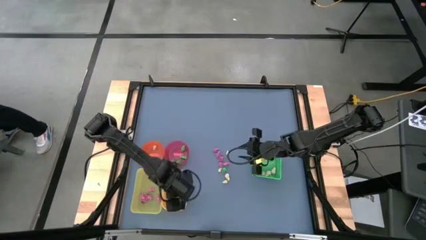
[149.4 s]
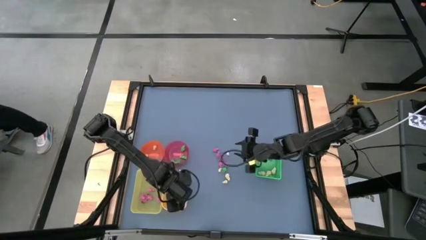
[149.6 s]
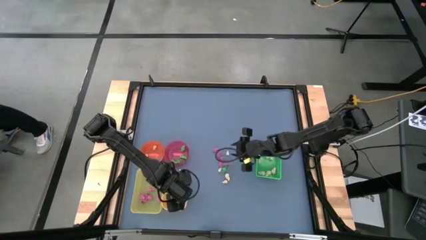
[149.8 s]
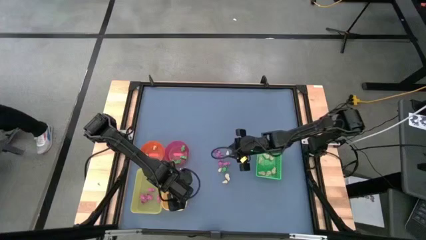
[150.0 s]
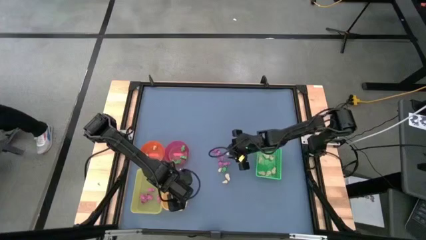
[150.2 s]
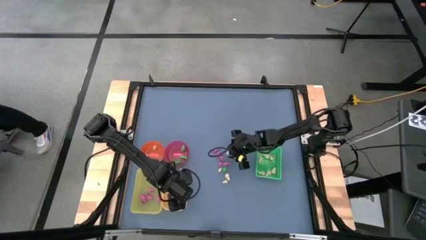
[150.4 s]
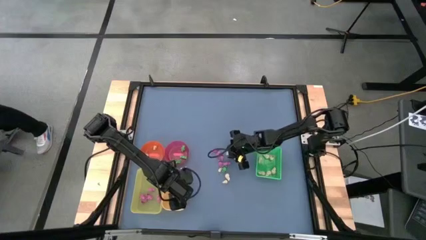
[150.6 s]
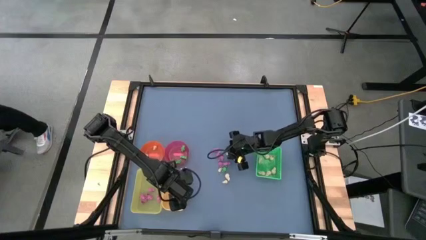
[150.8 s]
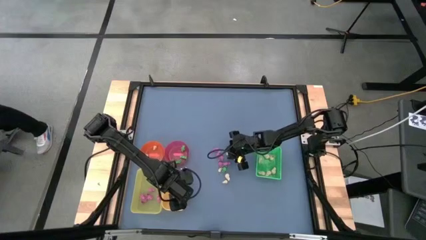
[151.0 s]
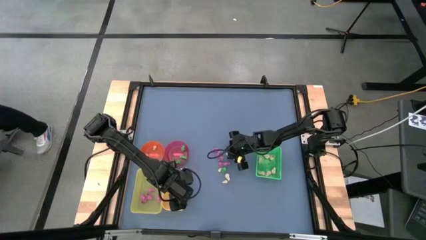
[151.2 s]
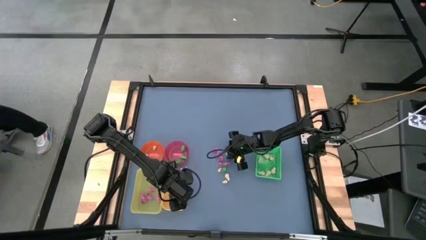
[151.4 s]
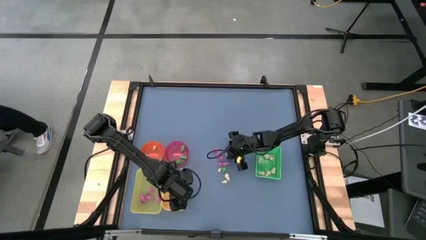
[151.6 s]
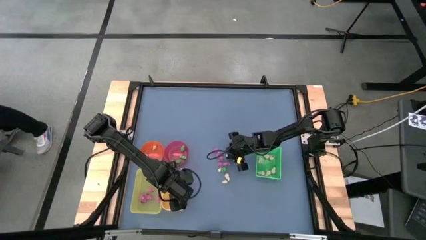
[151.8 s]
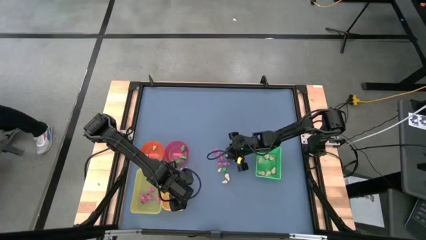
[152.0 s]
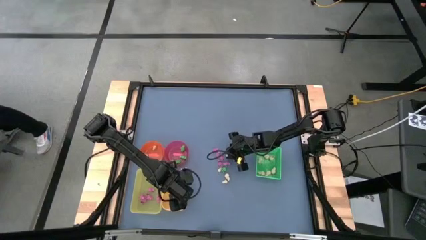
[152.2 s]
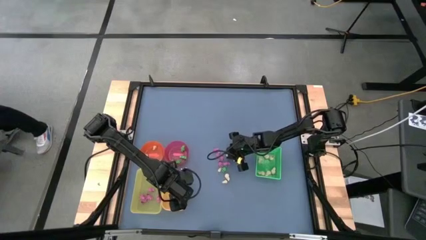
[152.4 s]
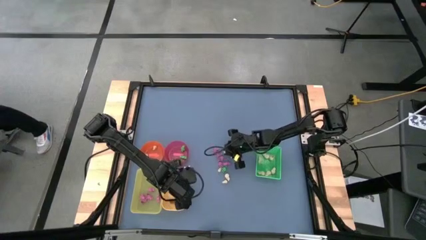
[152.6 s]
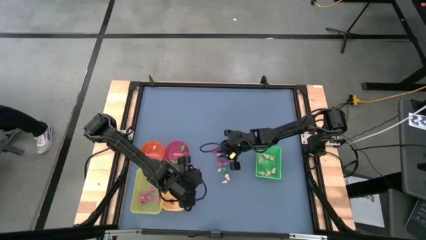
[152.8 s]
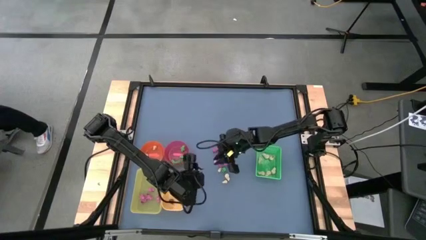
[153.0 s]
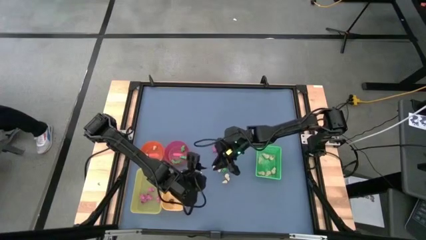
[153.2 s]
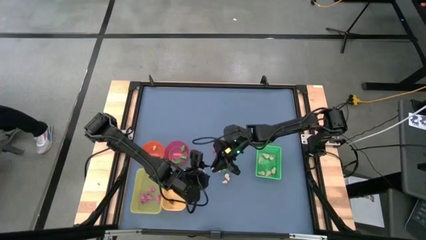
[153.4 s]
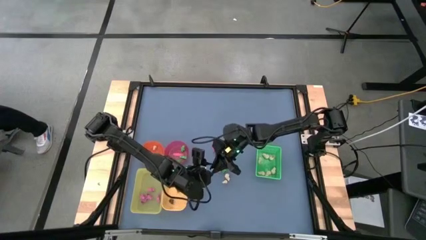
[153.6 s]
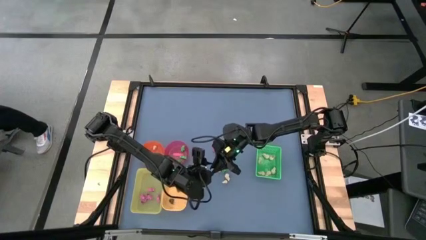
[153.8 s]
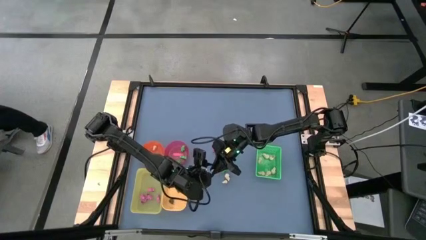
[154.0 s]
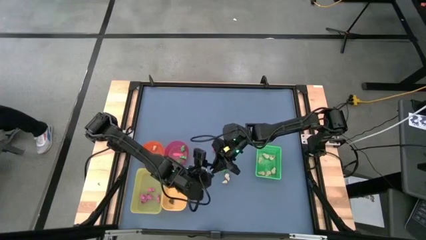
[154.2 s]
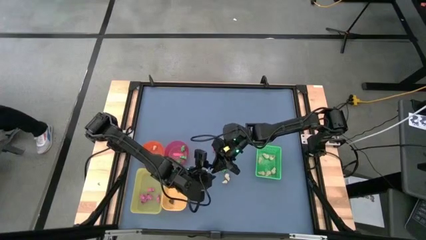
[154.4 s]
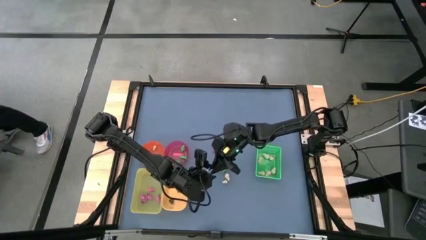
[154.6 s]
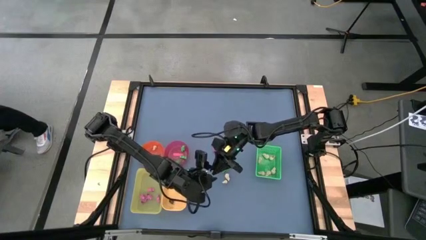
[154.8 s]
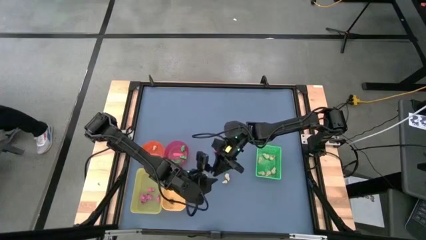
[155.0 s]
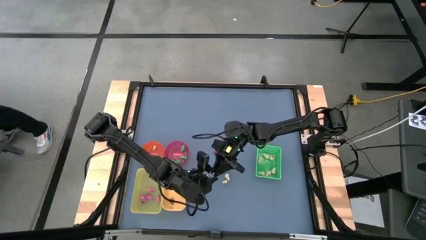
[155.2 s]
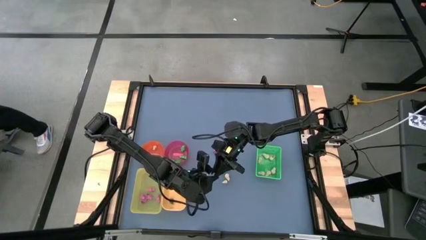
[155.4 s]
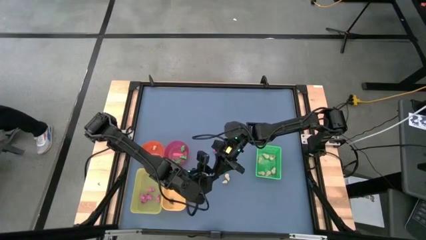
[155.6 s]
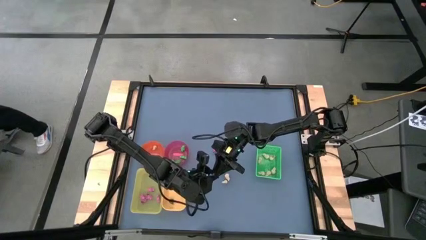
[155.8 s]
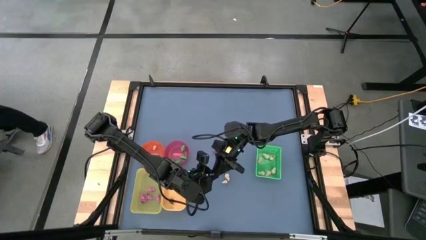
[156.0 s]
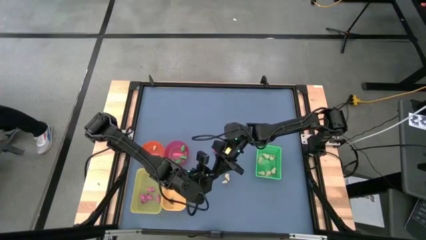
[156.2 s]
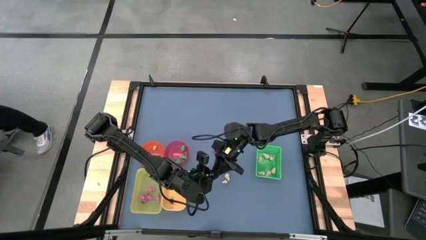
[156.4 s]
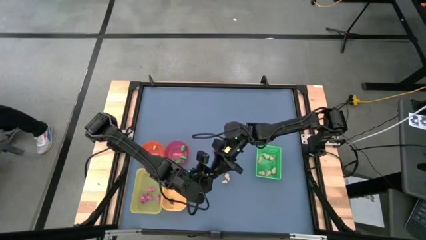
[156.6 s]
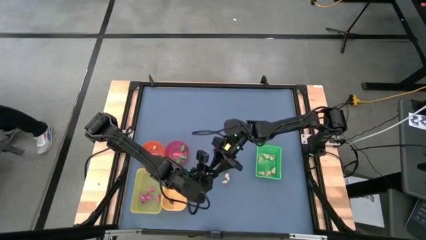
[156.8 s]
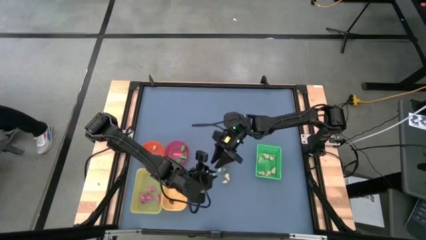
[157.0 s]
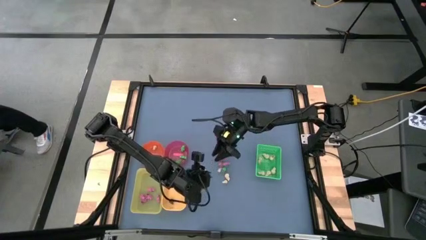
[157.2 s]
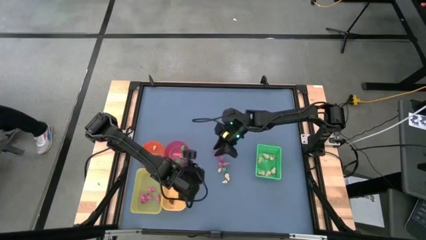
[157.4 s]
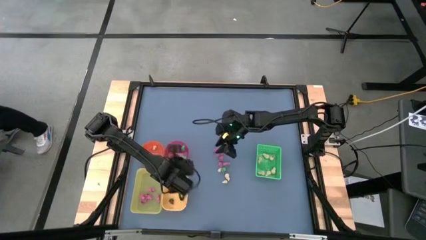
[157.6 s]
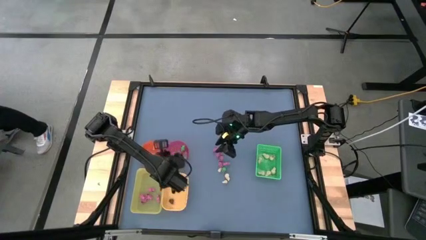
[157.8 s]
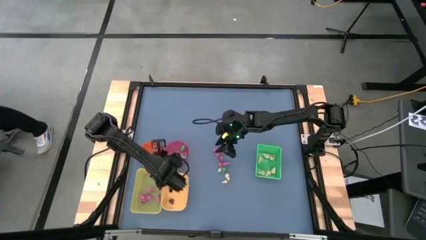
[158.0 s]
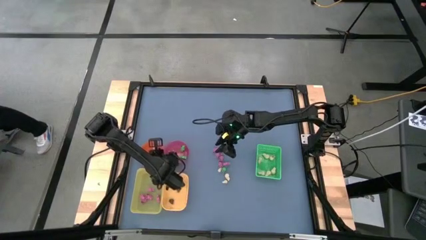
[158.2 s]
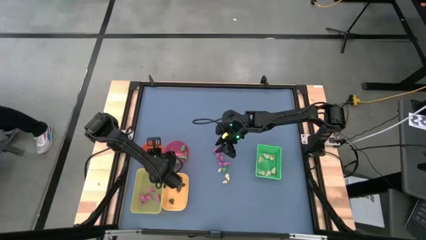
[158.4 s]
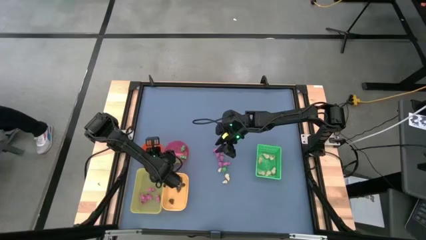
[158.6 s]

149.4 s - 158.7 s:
Task: Sort Halloween decoration
Put the white skull toy into the orange bowl

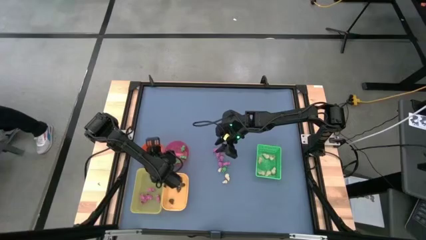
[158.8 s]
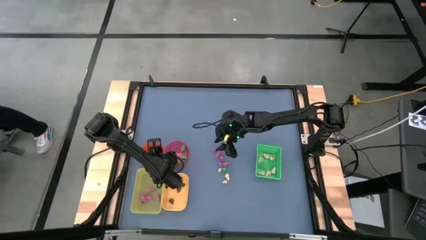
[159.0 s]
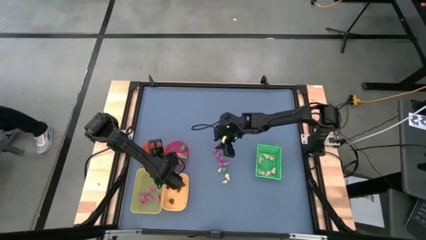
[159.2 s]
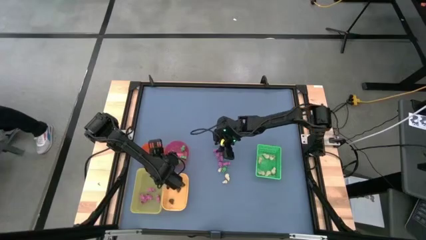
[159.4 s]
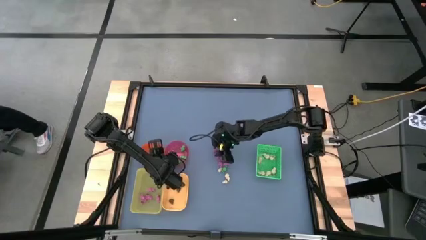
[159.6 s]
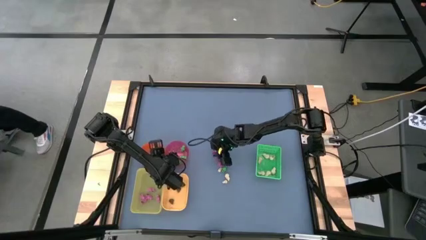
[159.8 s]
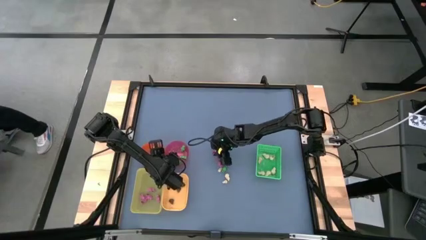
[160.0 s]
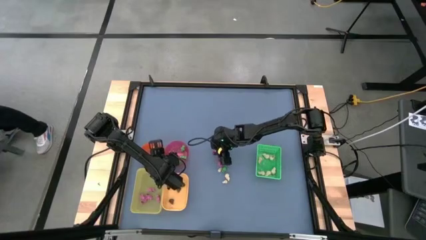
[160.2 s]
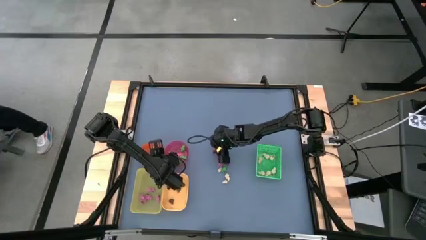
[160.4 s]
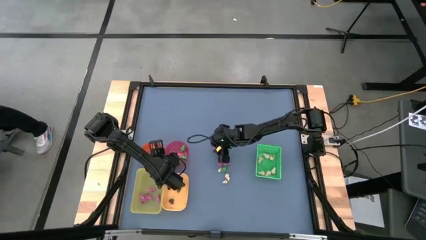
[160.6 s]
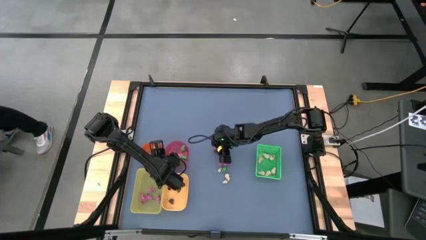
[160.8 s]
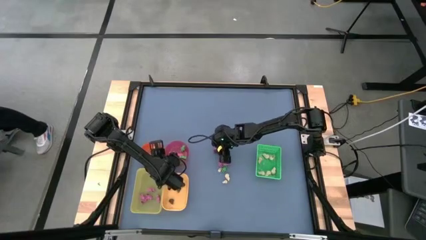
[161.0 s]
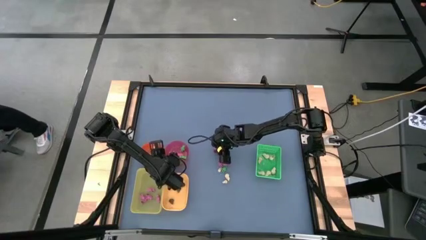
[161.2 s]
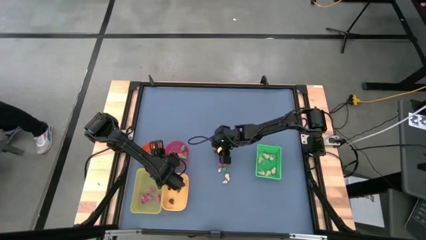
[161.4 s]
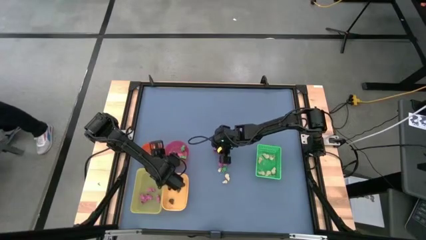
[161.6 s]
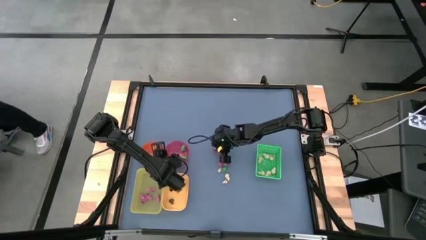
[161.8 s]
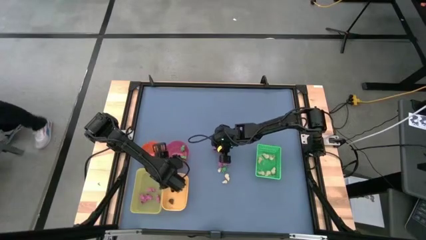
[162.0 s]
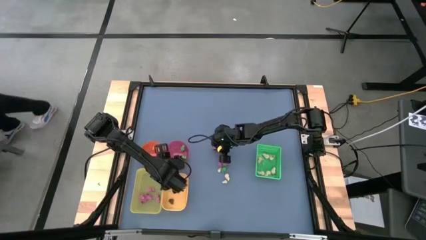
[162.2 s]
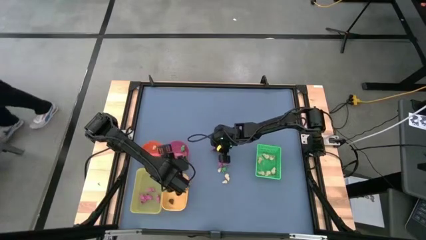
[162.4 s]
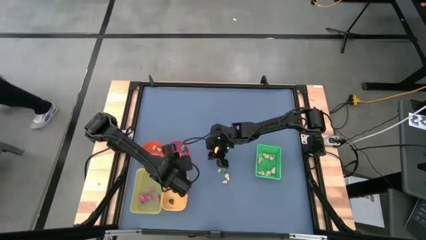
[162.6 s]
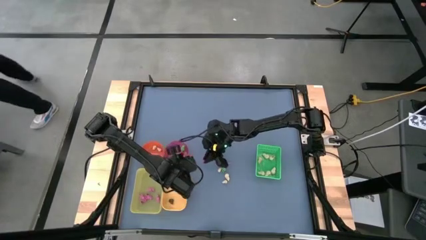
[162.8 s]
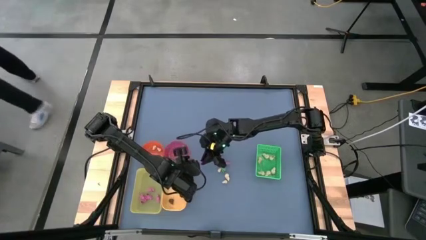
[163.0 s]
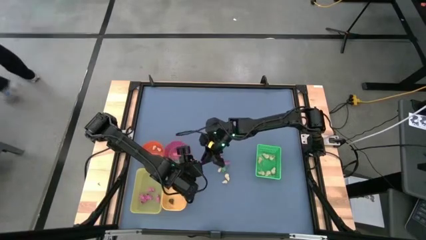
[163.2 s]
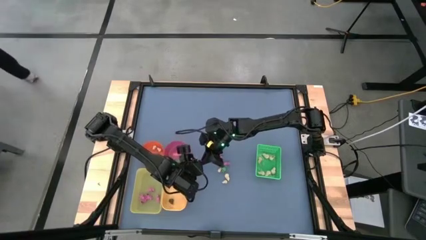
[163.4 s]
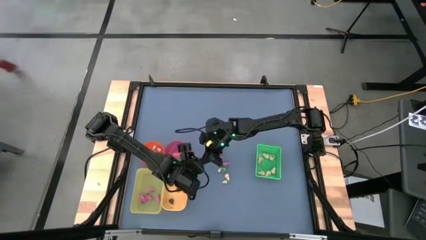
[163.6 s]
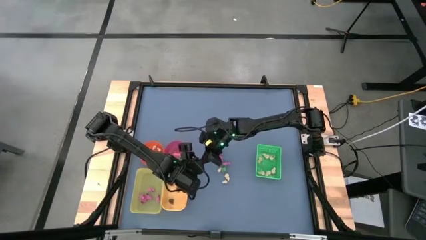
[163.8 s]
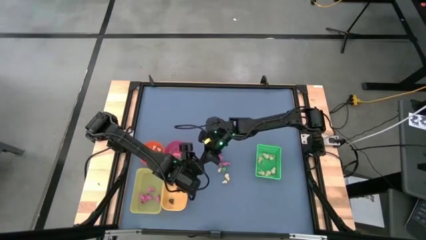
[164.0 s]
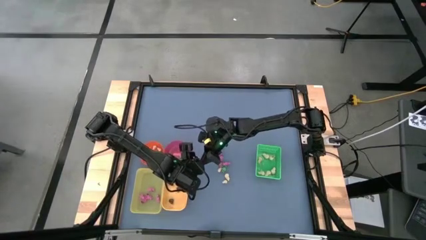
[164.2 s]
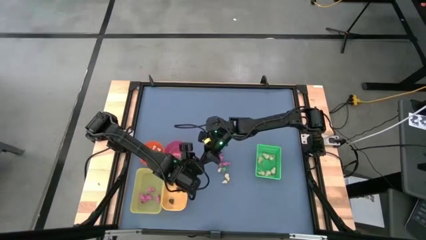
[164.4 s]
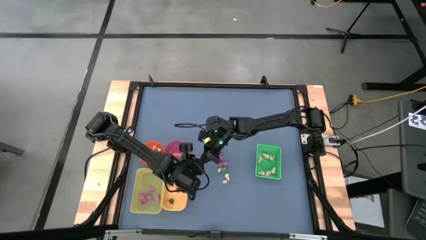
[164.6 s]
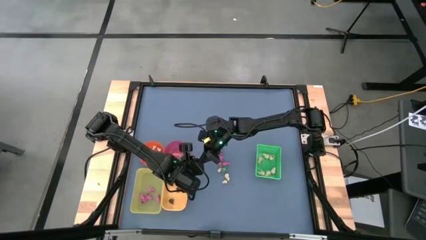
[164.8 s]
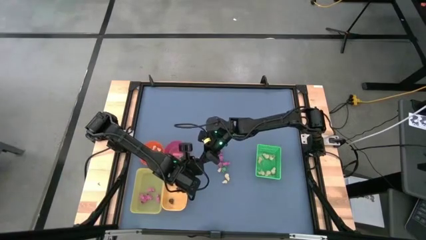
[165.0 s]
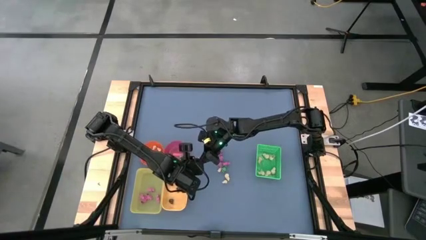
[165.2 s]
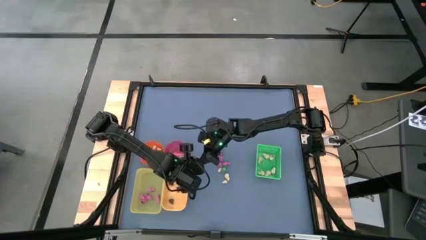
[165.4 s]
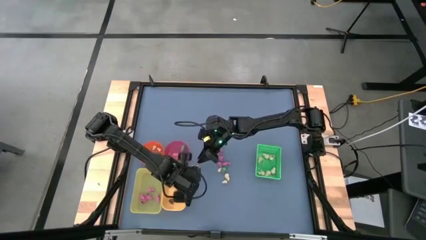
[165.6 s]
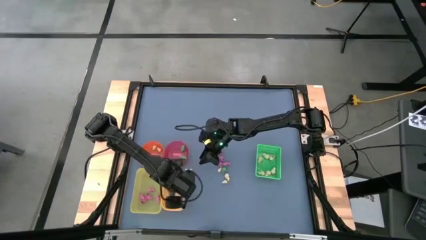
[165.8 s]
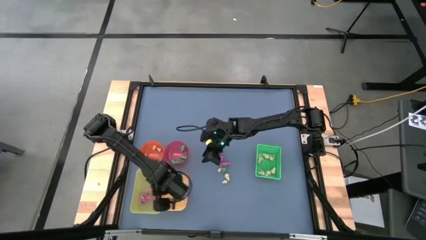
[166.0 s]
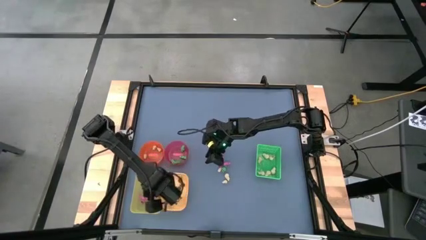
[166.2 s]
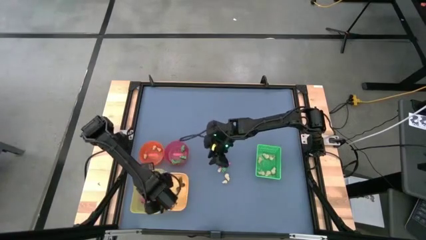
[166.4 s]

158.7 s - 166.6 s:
Put the pink skeleton toy into the light yellow bin
